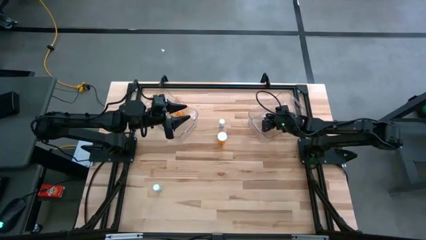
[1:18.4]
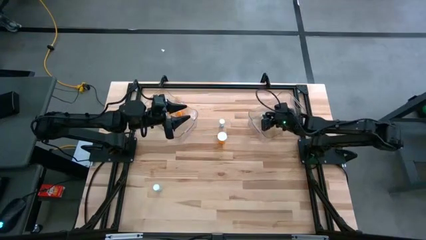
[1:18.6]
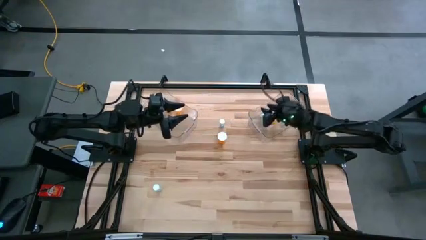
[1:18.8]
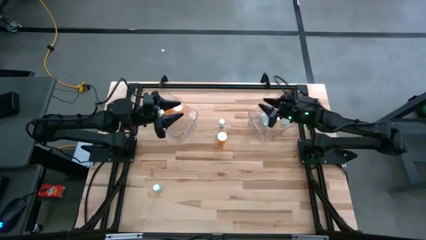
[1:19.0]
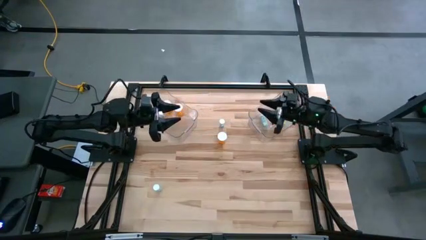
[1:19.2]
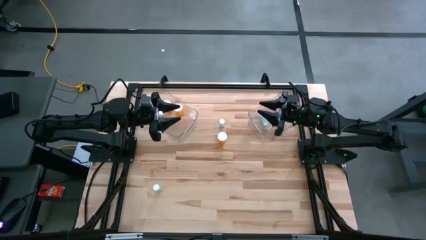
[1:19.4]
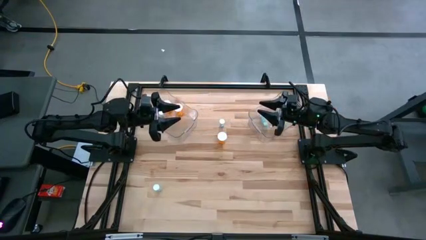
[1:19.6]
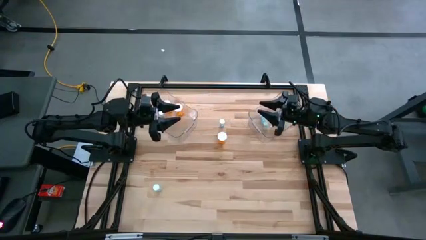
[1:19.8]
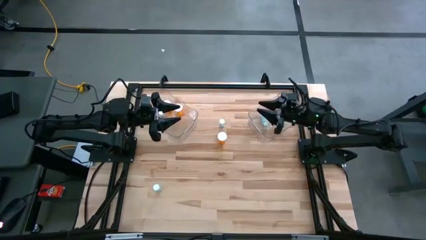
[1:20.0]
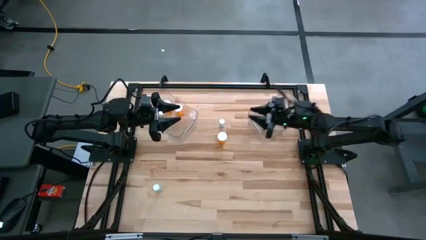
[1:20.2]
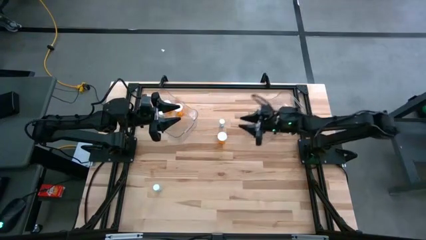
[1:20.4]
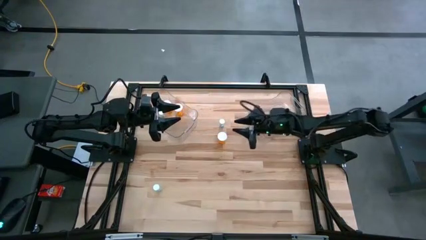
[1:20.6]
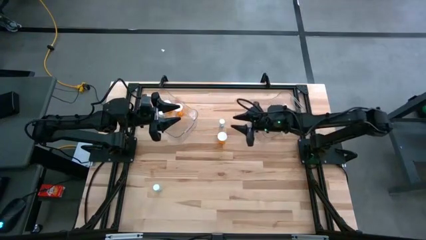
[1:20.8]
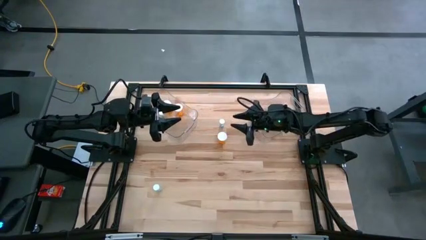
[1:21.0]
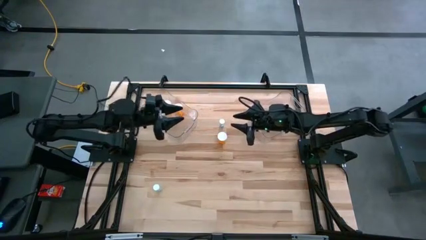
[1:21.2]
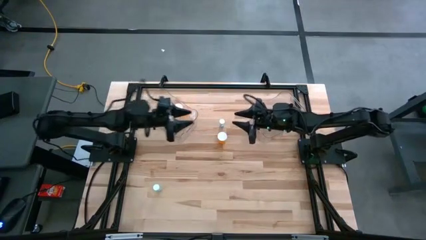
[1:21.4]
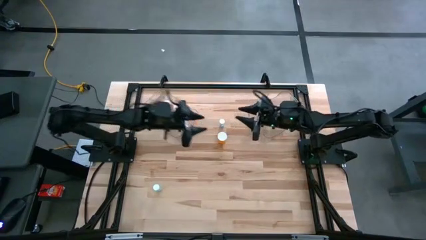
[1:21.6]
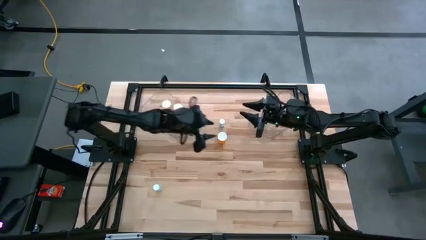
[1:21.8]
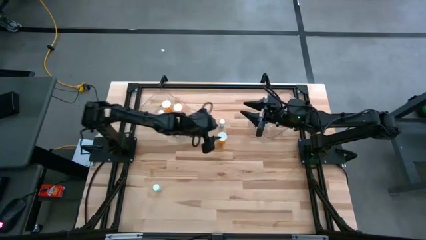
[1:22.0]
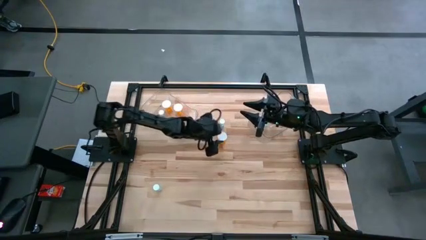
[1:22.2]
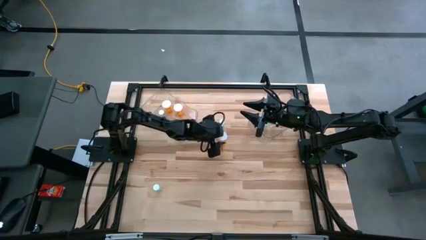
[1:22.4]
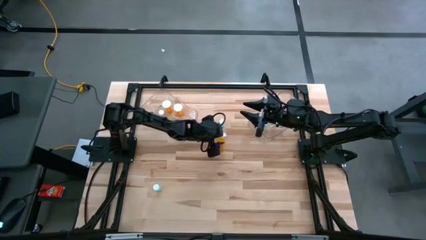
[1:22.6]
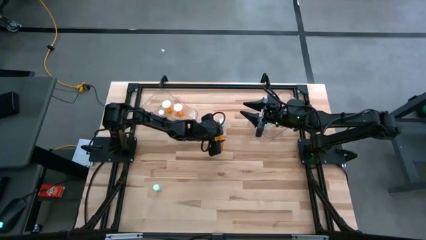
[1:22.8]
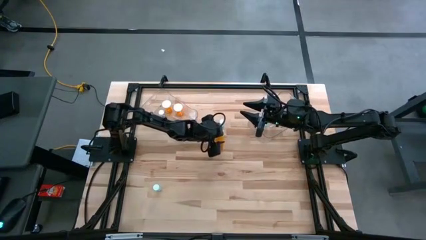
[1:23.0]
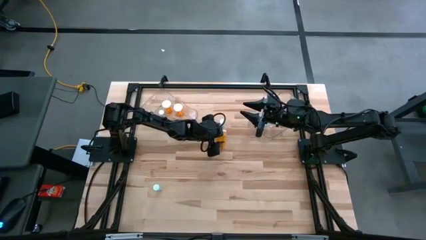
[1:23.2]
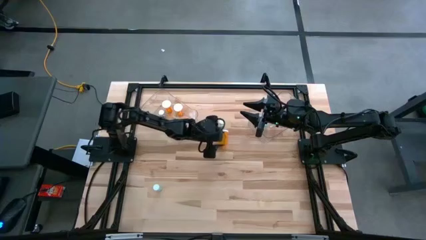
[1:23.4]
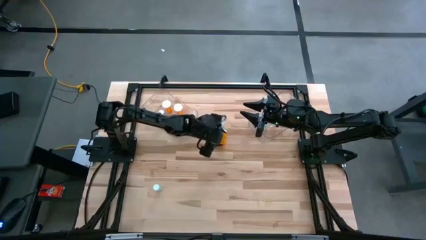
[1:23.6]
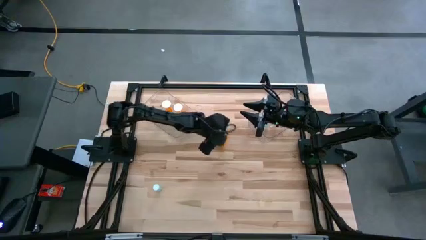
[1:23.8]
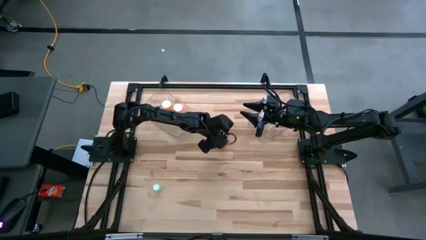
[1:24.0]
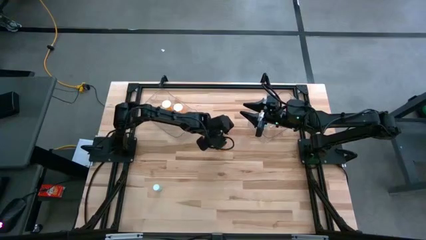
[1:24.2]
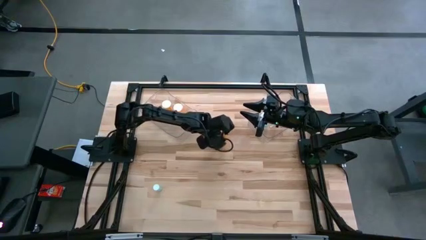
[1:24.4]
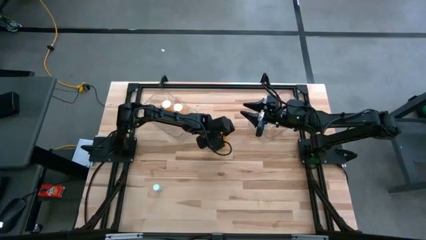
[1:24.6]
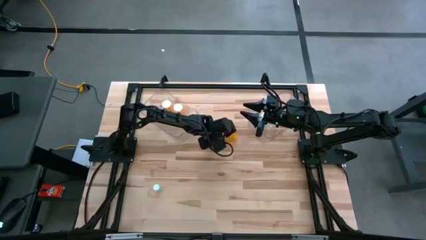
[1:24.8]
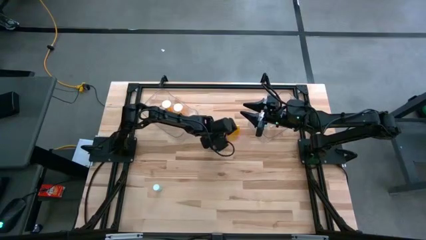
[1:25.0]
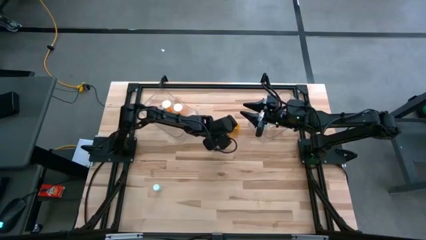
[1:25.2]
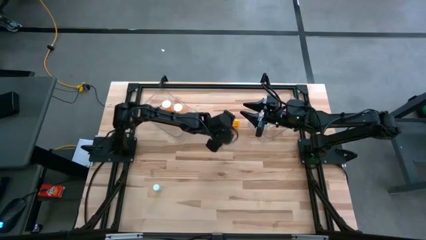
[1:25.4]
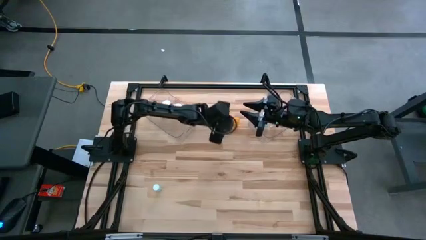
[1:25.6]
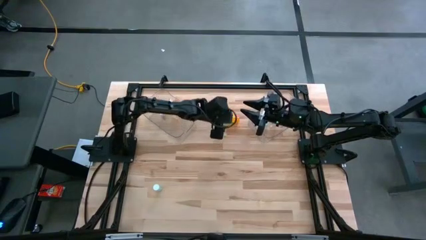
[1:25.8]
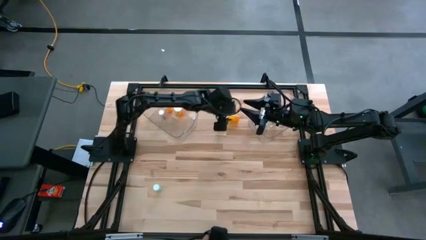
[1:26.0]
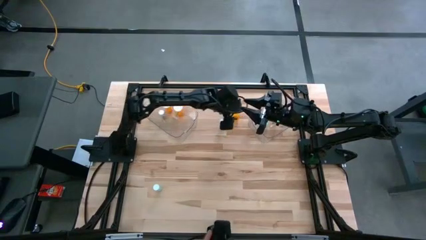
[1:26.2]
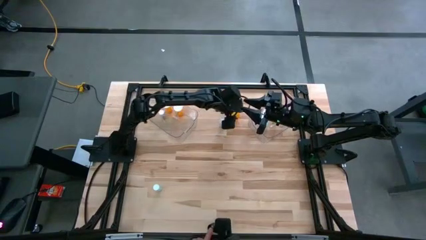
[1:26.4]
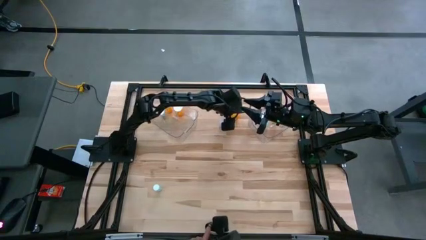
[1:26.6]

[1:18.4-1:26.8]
Task: Pick and place medicine bottles into bin by pill shape (circle, oval)
Put the orange capsule bottle into the left transparent bin

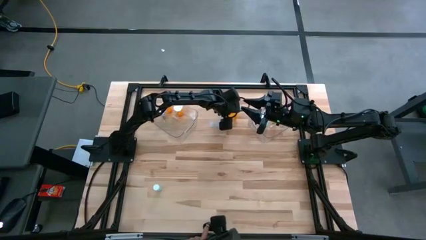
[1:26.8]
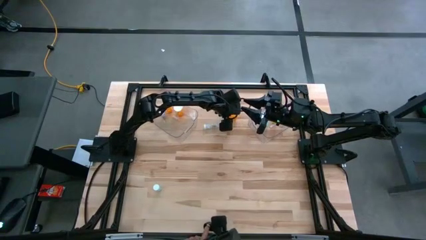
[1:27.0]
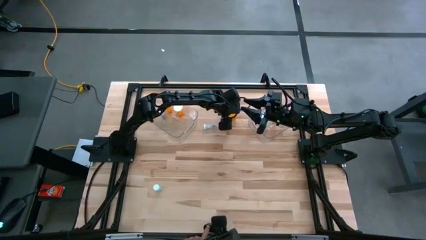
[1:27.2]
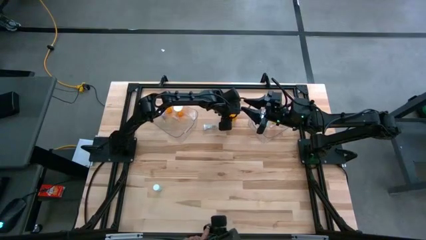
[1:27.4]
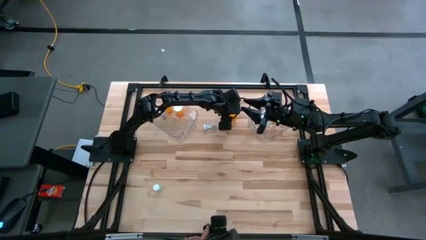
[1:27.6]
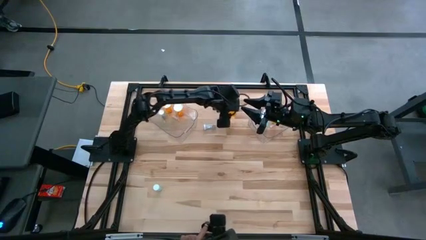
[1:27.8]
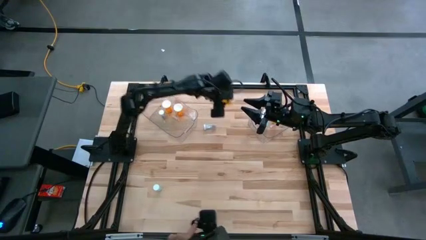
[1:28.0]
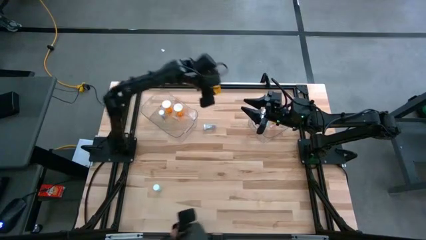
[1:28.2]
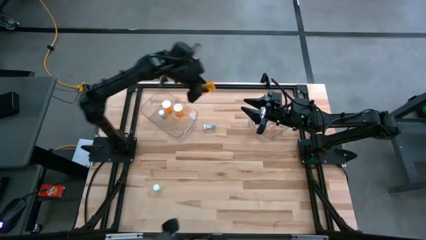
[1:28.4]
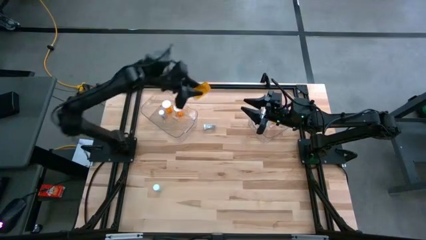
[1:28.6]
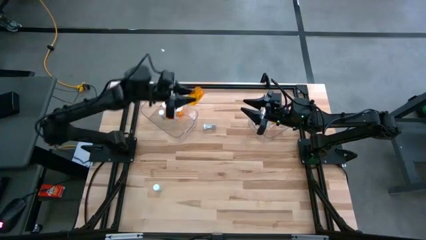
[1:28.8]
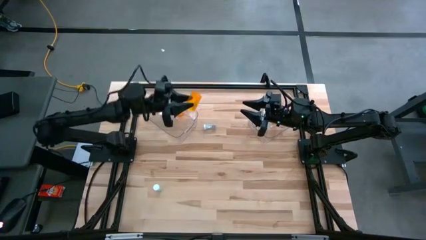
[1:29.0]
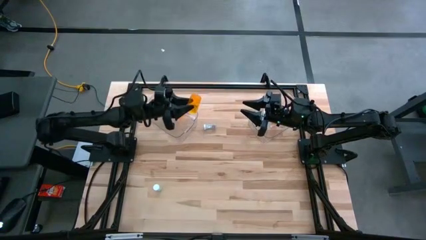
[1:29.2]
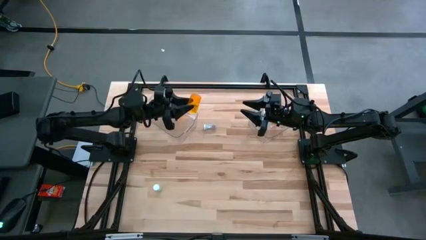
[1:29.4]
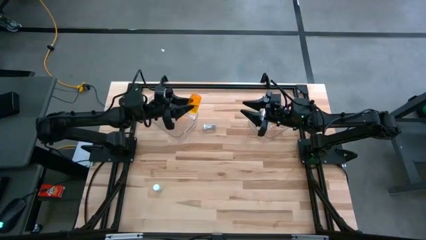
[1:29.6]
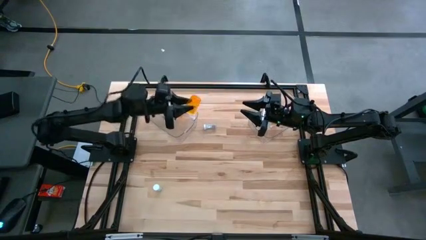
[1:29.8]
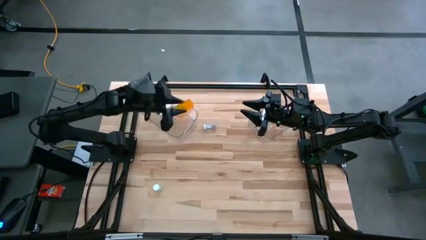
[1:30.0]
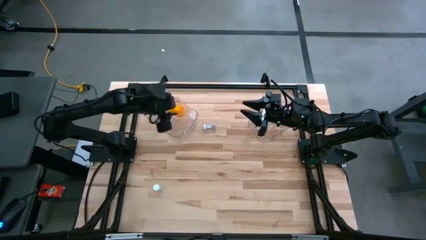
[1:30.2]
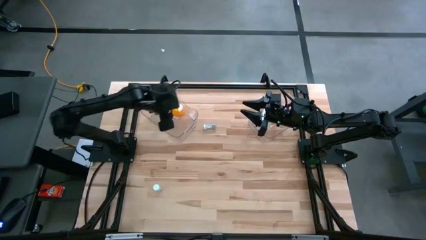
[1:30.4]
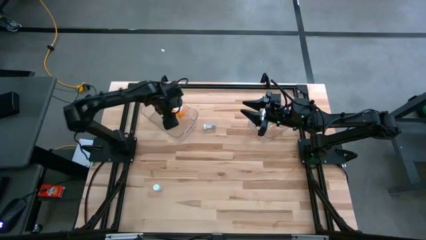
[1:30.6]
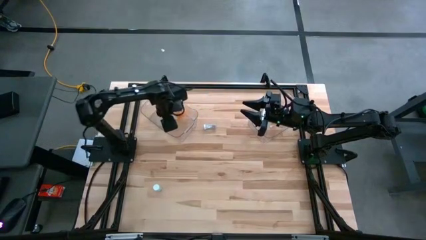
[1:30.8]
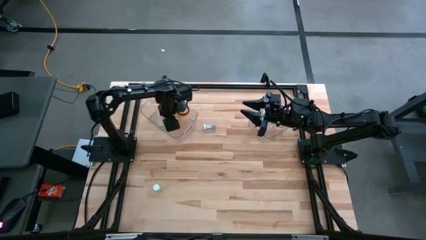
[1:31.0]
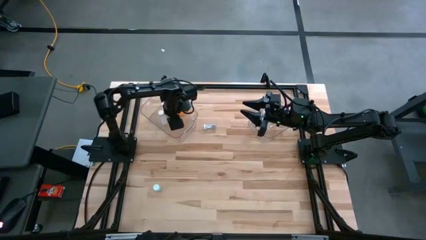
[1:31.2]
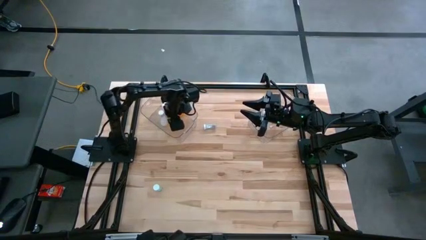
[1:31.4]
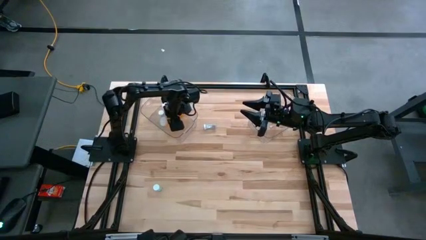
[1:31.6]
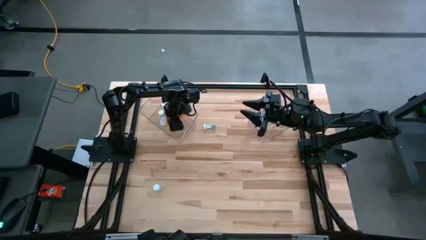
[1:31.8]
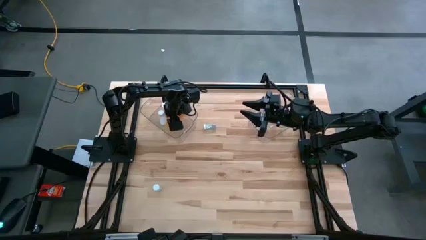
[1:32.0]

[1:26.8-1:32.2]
Put the orange capsule bottle into the left transparent bin

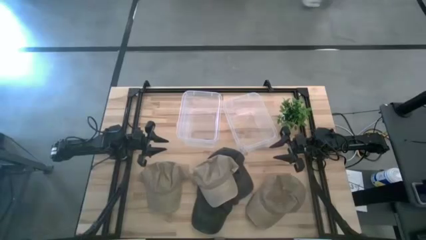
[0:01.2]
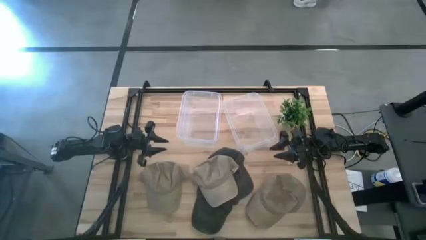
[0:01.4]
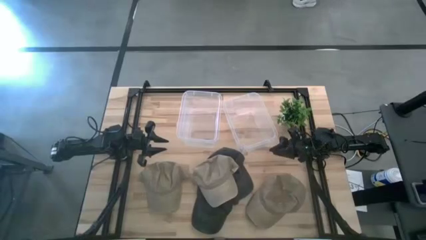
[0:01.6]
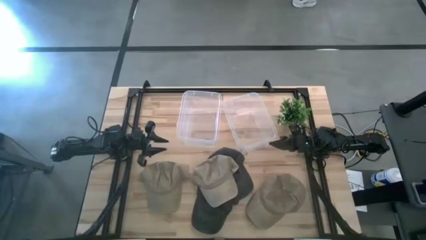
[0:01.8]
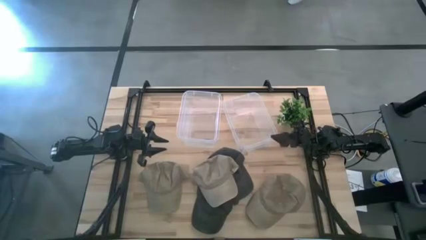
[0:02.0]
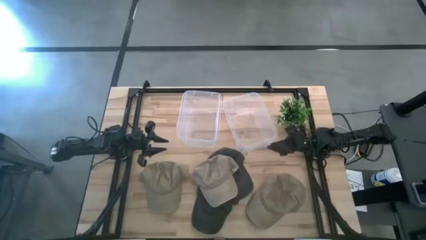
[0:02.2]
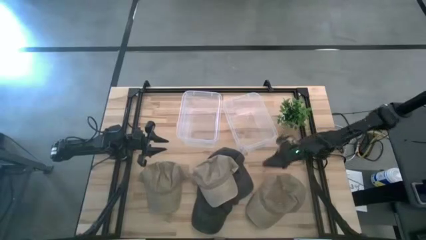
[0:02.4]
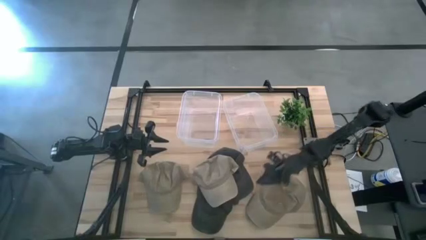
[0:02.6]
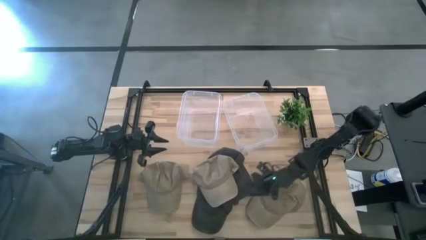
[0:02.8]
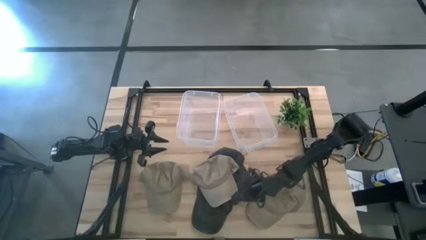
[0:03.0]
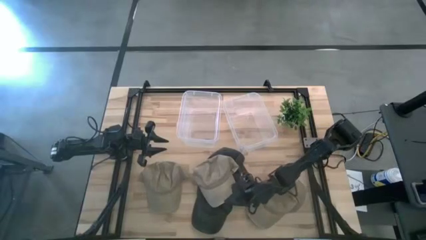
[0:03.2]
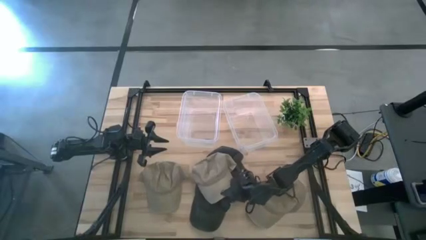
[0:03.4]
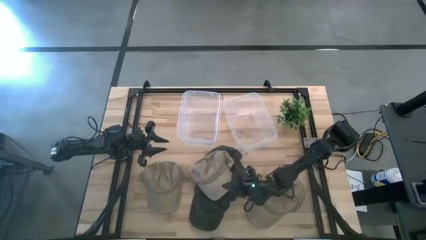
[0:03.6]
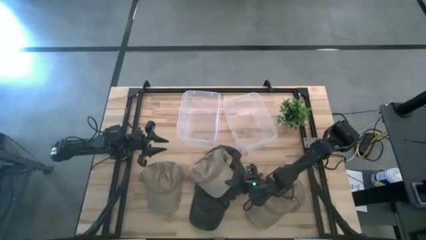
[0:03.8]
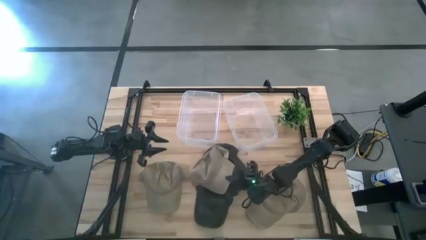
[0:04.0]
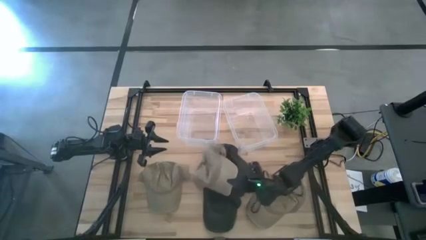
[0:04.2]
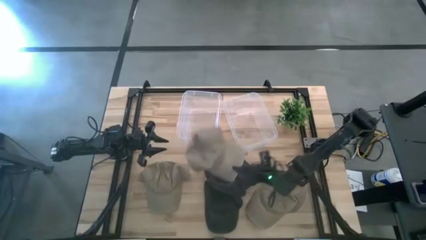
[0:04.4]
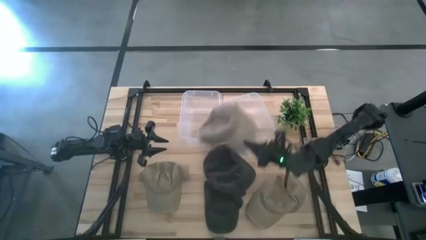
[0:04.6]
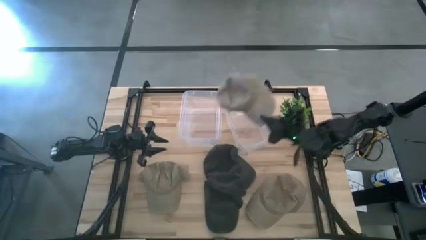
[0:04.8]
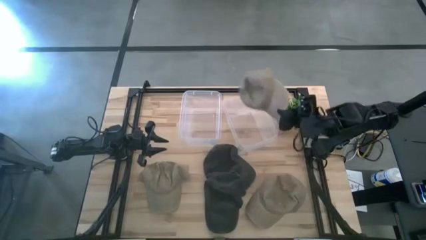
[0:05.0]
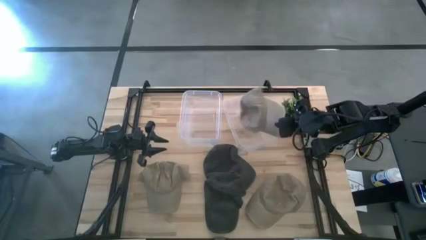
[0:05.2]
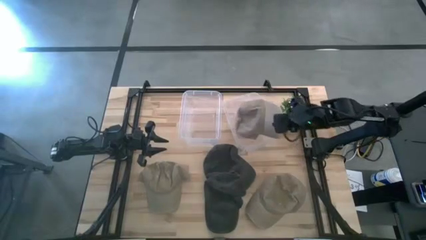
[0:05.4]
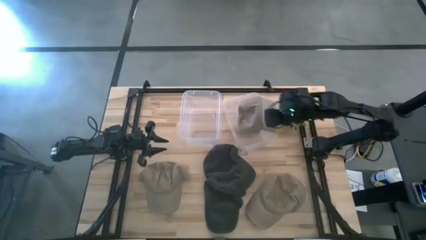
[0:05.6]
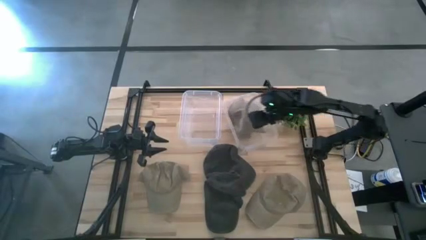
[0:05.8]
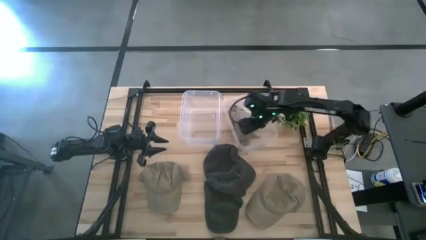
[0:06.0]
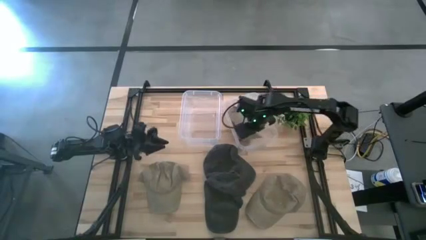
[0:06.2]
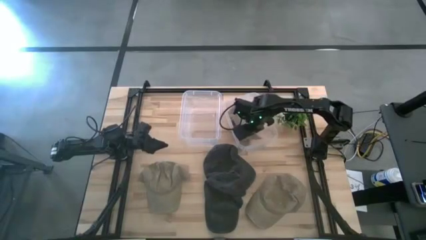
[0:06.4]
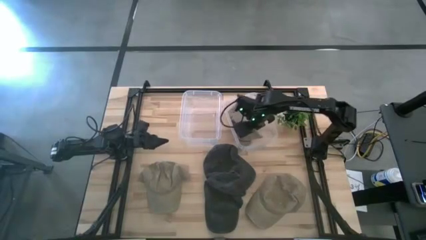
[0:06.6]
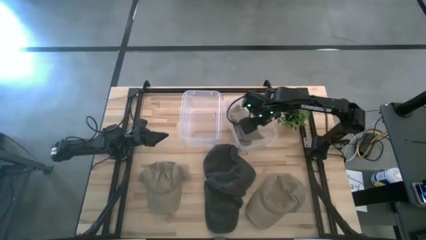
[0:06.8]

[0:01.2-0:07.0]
Task: Pick & Place hat
Put the middle brown cap into the right transparent bin
